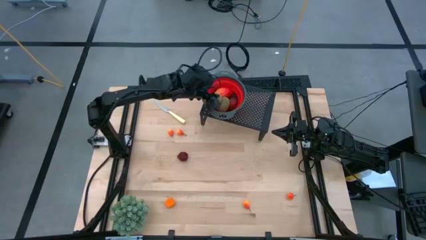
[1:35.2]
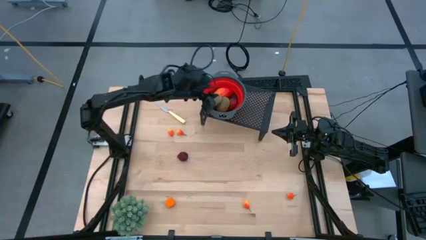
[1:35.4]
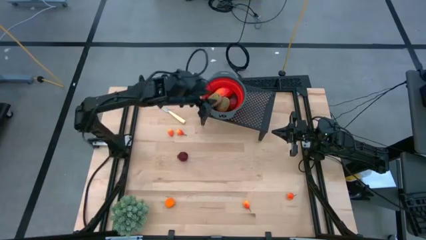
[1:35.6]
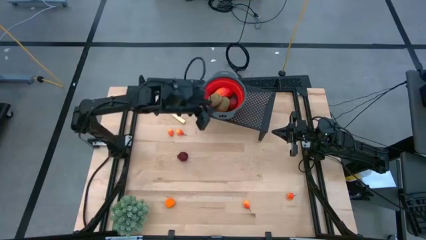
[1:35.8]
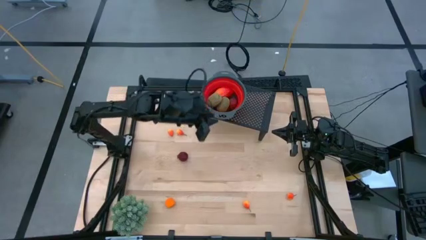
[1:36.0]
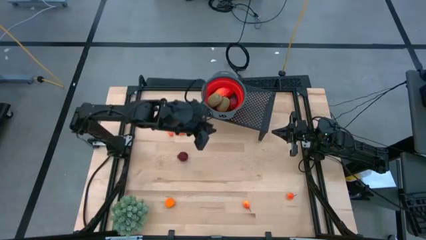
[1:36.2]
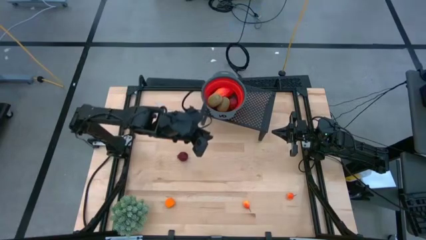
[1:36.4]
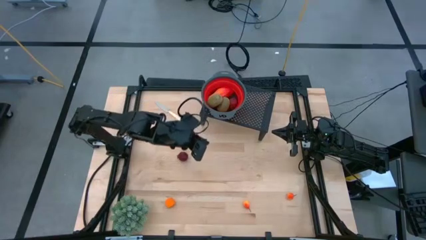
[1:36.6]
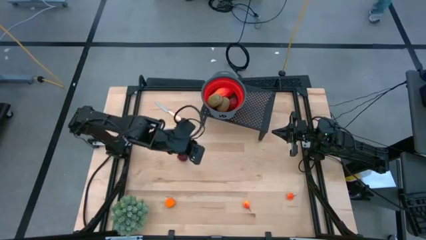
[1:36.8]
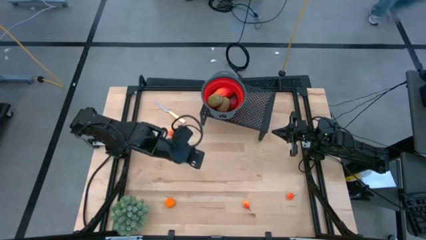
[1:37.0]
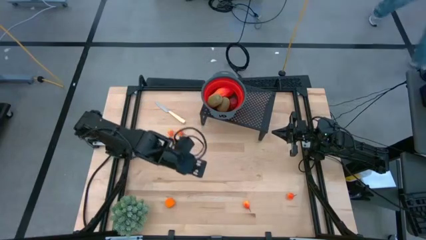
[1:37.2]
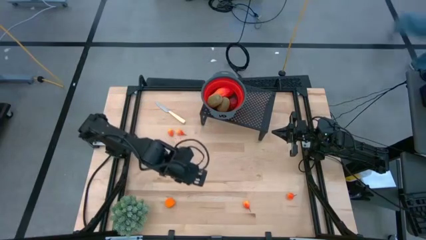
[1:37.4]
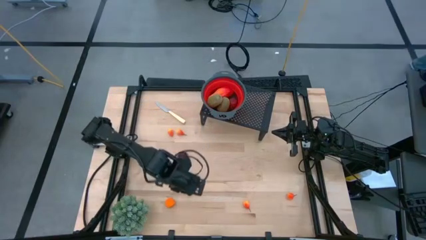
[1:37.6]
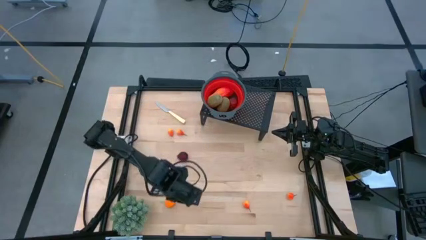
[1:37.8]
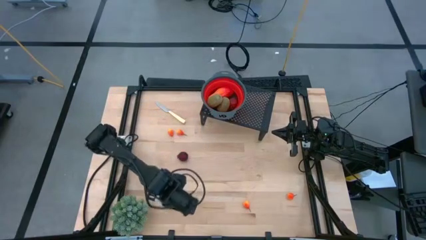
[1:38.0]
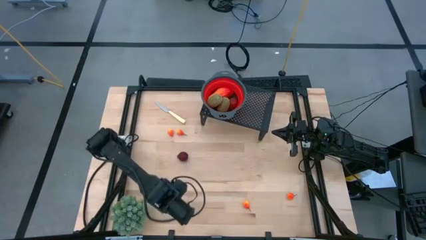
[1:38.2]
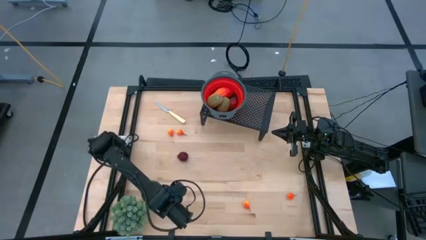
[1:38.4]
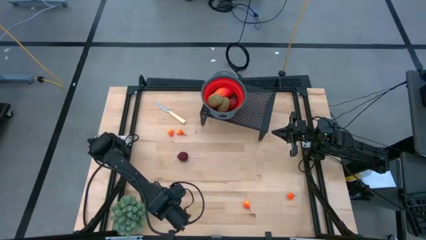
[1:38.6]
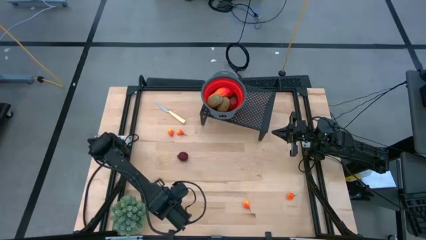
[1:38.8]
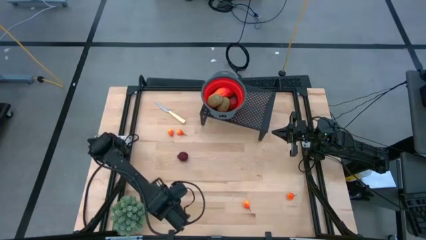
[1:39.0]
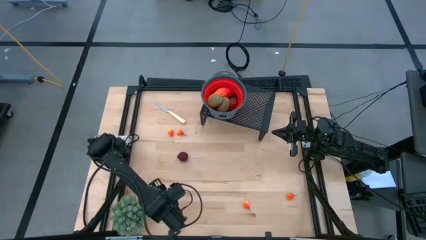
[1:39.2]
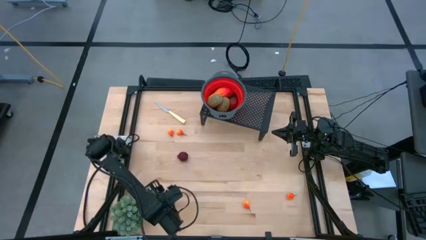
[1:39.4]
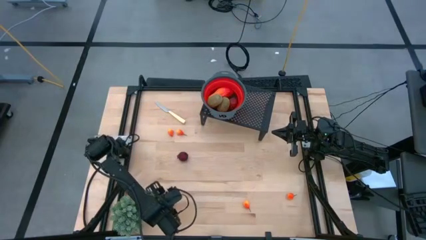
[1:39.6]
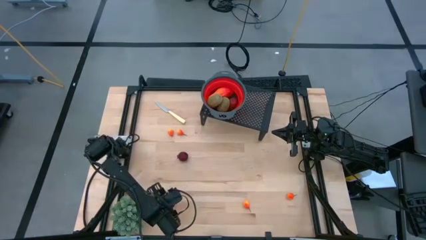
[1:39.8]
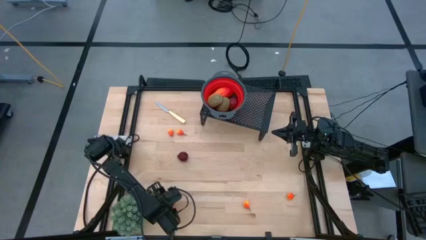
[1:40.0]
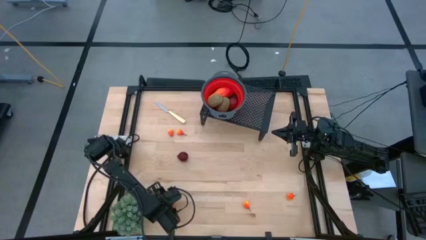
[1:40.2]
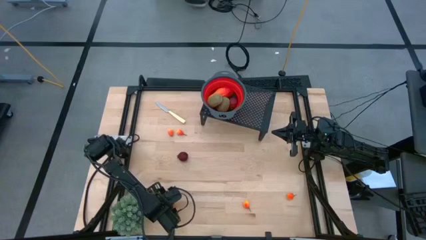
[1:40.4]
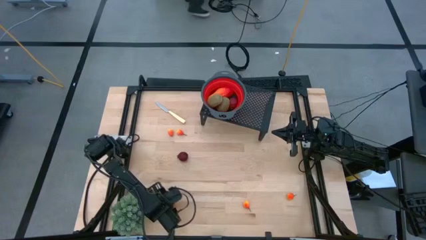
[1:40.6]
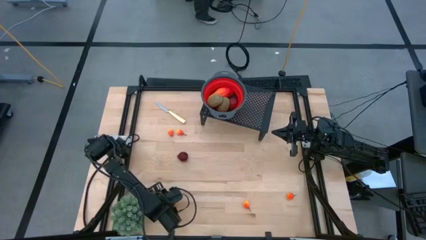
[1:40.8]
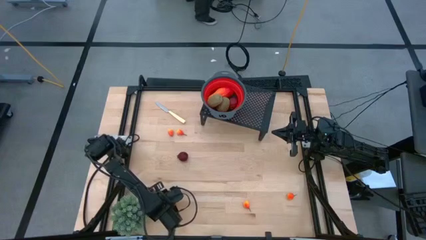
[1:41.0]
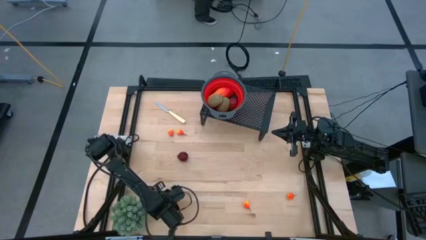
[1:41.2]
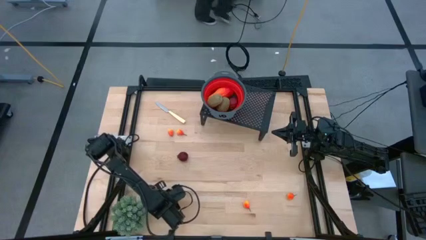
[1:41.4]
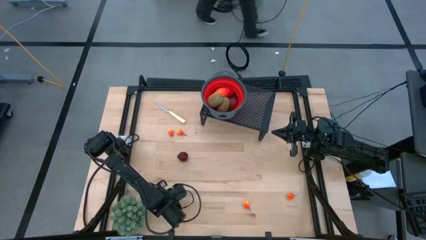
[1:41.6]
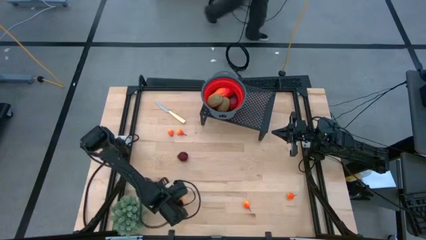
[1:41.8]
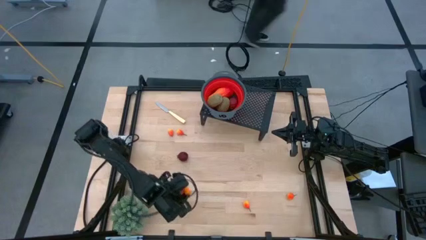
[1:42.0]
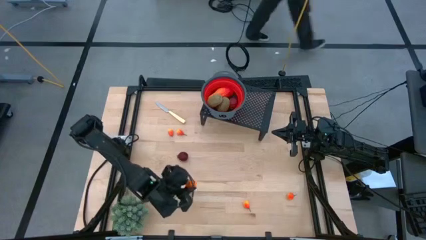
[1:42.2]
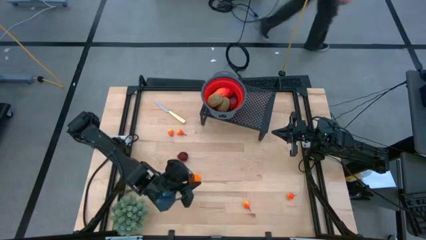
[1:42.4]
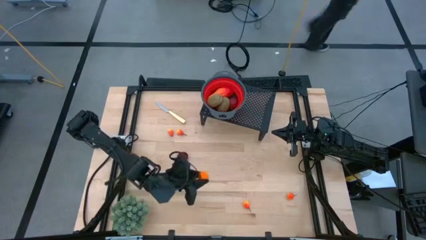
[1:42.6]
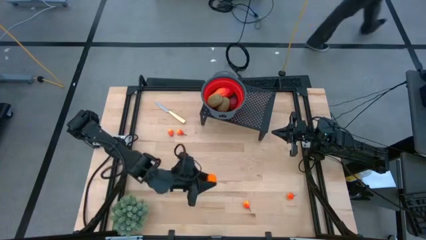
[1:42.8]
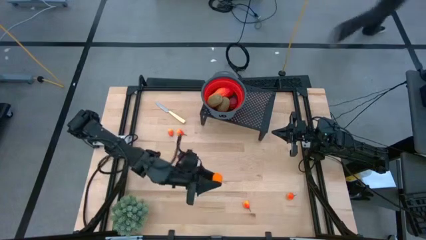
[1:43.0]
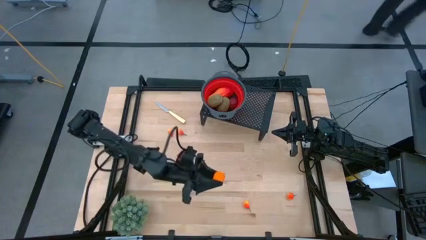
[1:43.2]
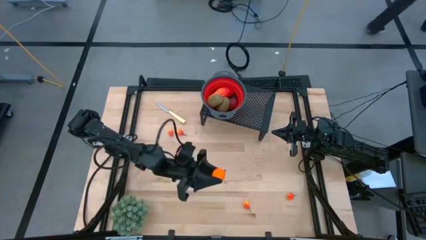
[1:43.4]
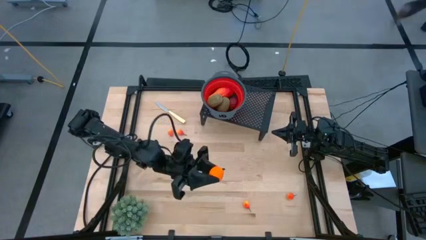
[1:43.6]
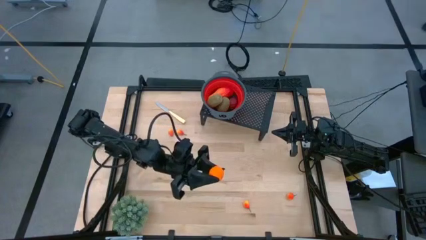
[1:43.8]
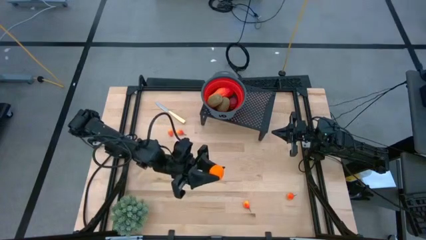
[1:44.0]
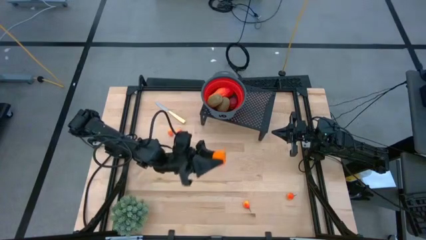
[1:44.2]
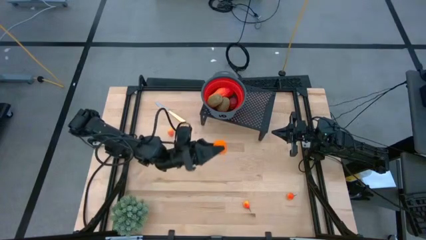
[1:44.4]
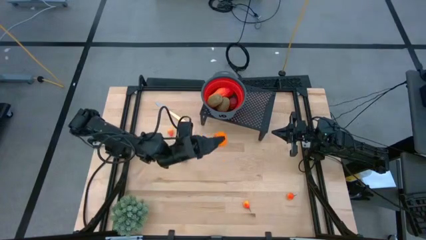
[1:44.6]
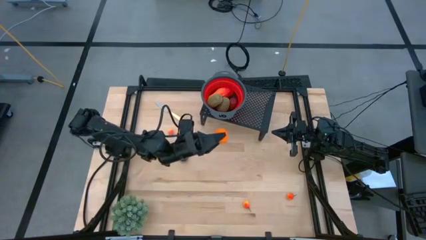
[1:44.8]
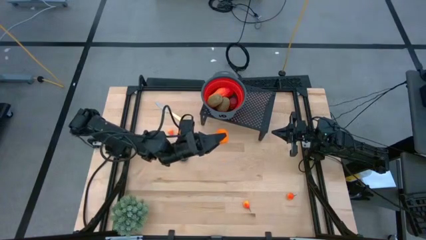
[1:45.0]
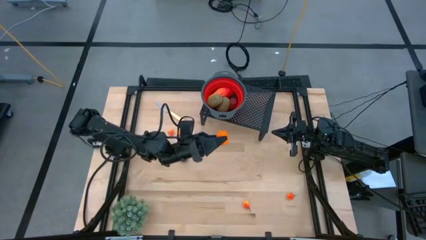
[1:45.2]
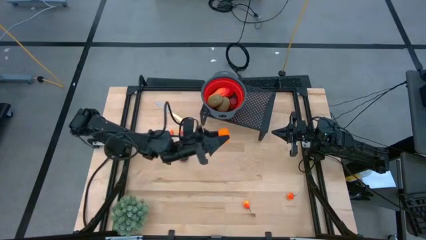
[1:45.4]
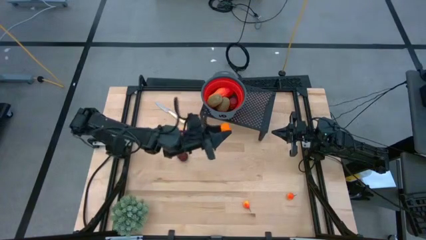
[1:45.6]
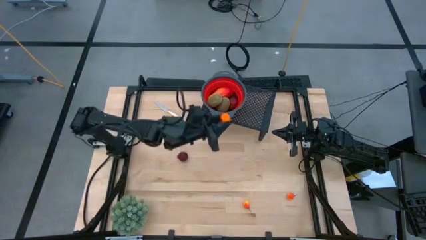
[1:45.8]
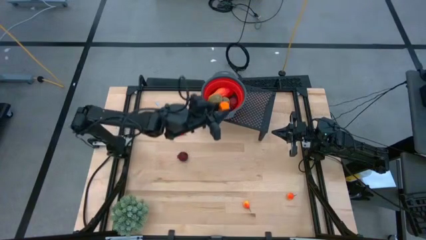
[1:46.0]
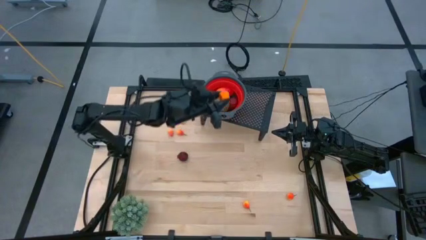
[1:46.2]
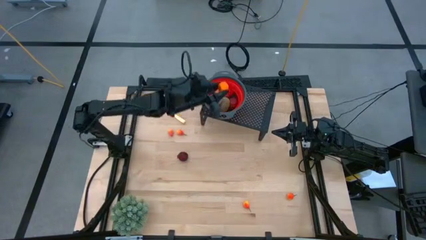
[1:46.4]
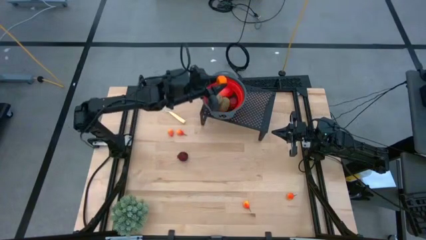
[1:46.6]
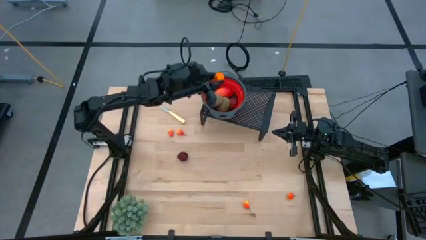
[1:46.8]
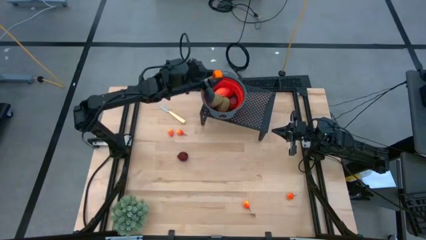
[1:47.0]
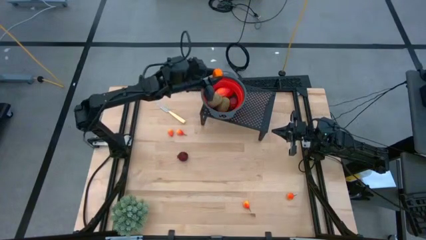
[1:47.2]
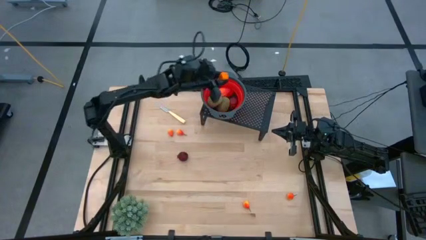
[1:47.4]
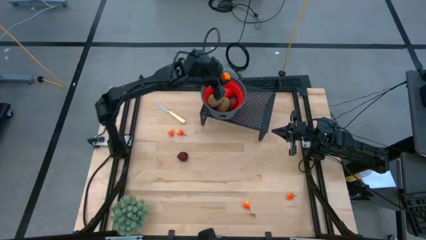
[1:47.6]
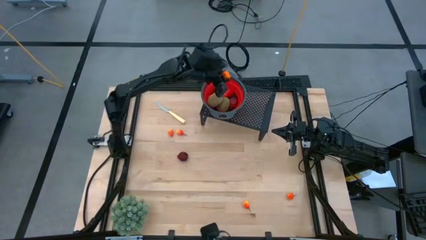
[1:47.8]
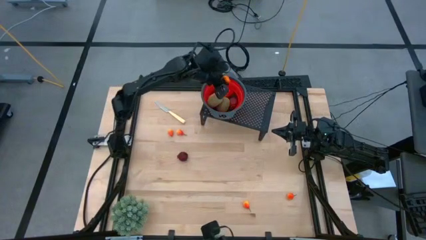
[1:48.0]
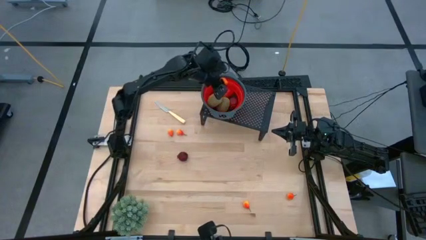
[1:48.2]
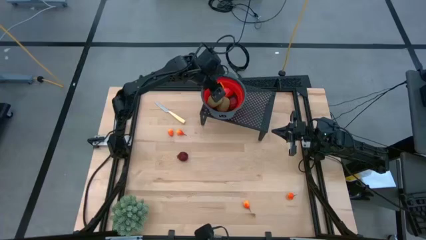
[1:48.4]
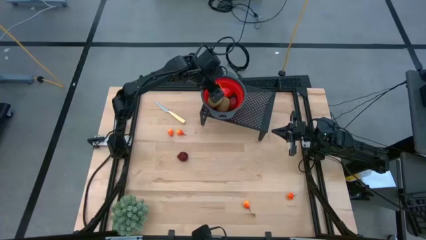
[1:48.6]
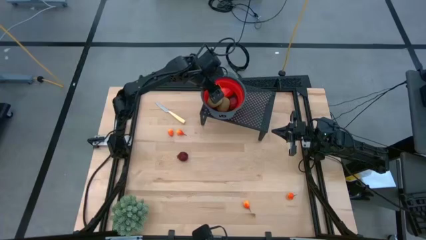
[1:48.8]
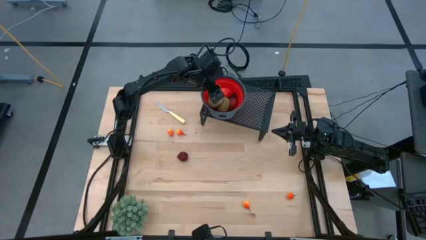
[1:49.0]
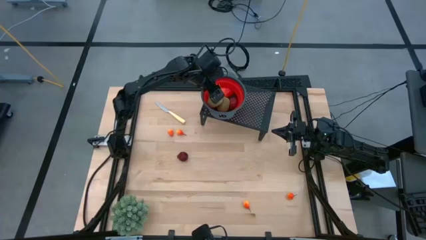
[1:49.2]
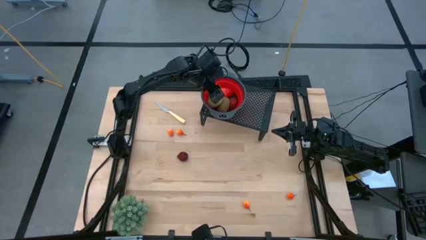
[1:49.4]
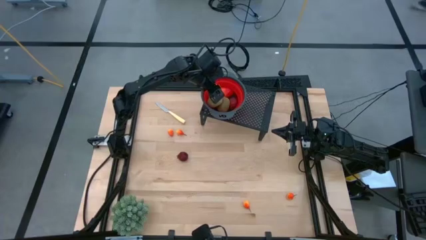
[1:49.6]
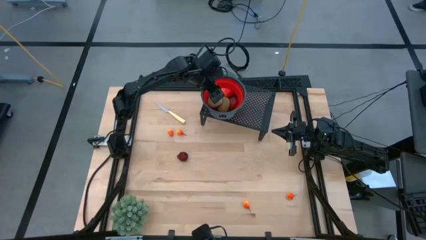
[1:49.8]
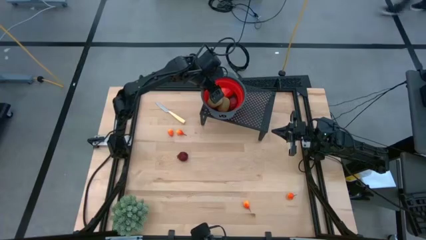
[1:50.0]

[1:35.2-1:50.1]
Task: Pick & Place Fruit
Put the orange into the strainer bowl on the shelf
